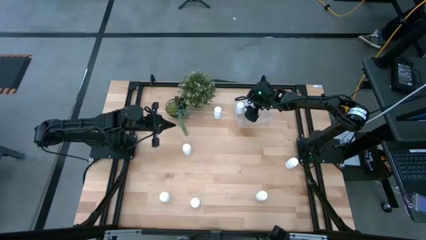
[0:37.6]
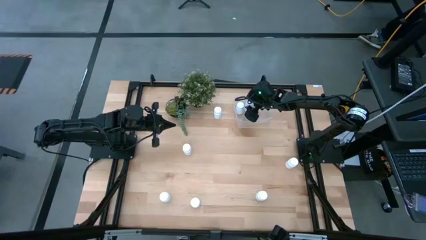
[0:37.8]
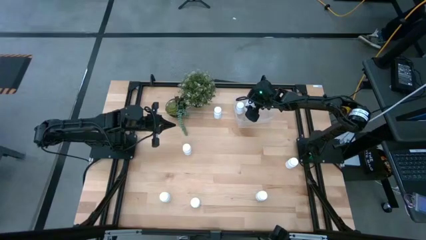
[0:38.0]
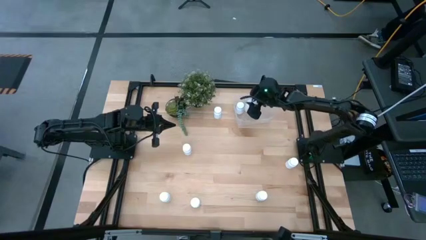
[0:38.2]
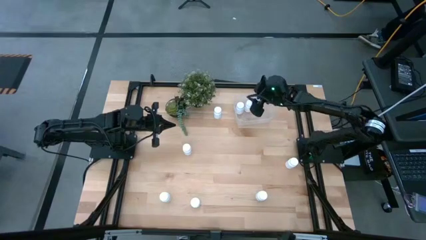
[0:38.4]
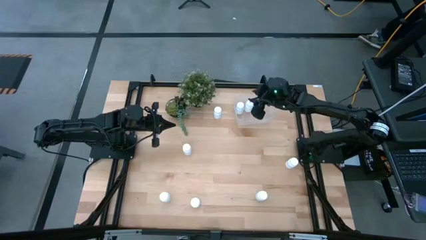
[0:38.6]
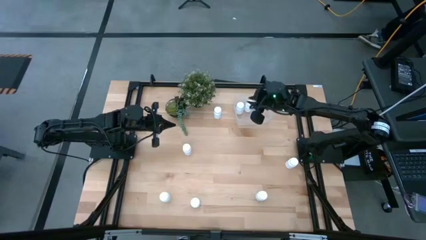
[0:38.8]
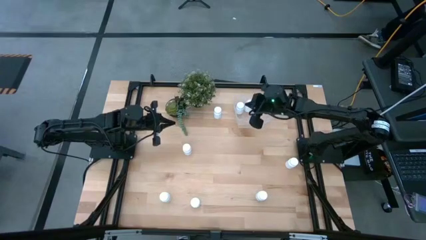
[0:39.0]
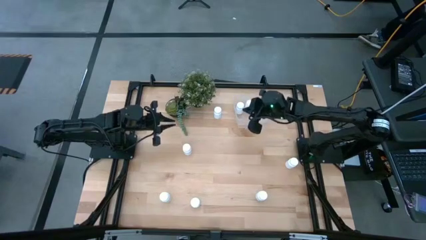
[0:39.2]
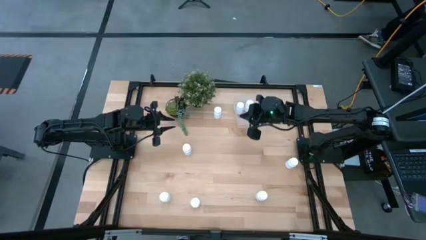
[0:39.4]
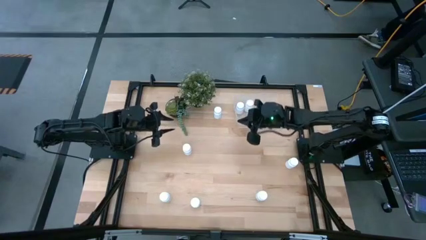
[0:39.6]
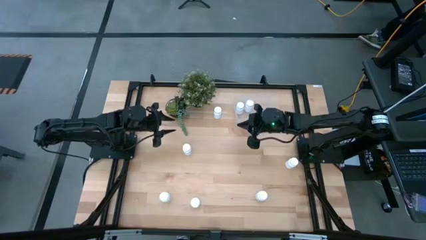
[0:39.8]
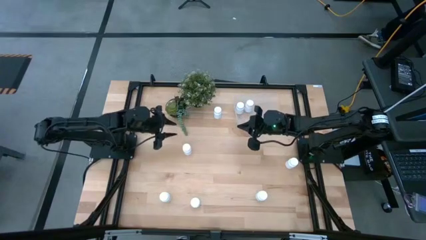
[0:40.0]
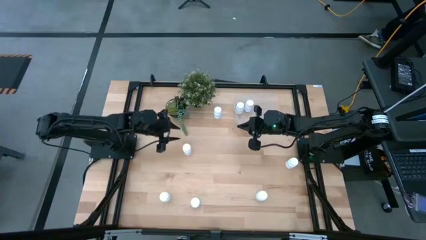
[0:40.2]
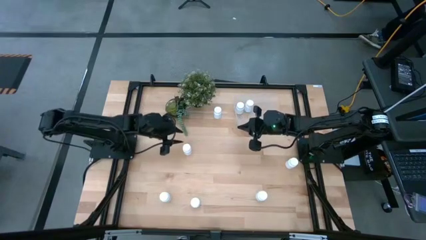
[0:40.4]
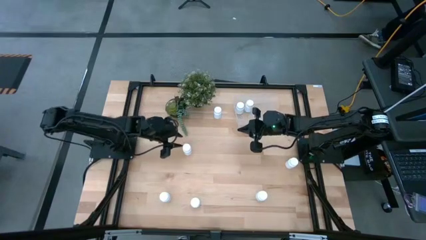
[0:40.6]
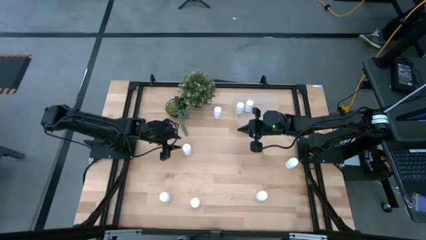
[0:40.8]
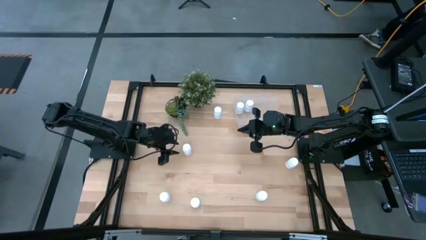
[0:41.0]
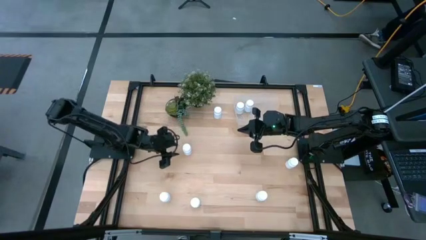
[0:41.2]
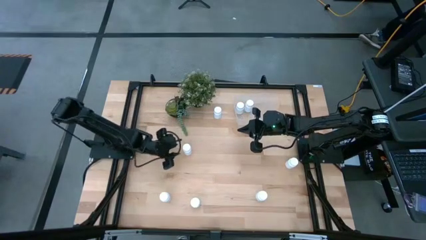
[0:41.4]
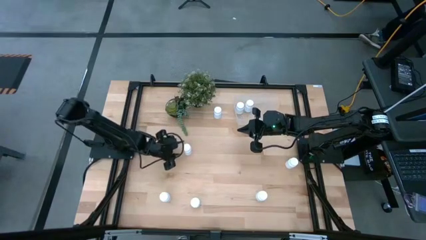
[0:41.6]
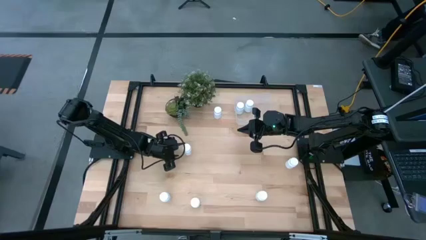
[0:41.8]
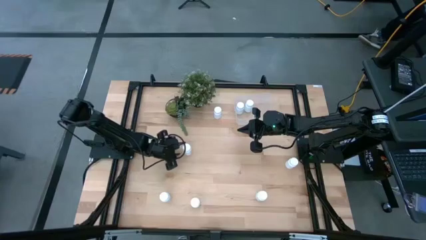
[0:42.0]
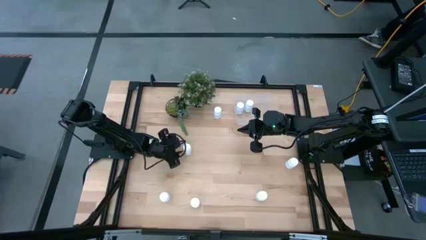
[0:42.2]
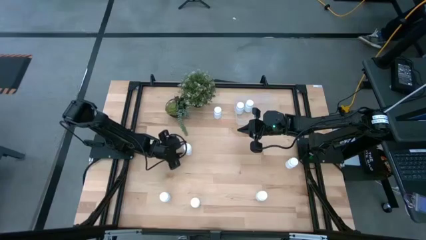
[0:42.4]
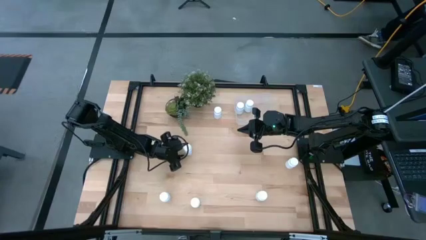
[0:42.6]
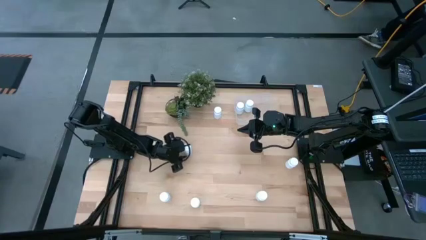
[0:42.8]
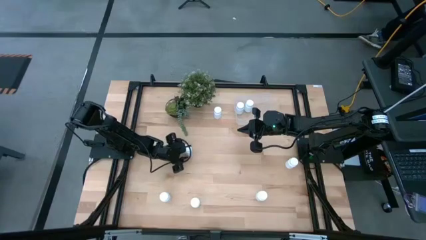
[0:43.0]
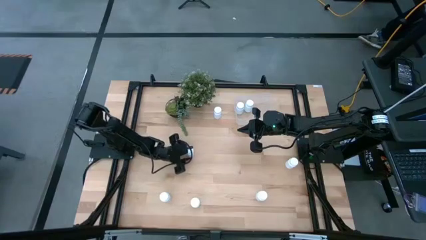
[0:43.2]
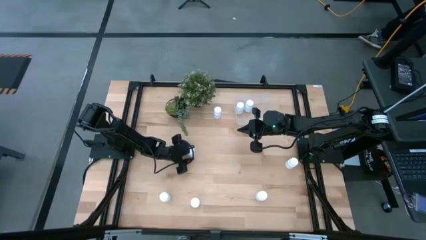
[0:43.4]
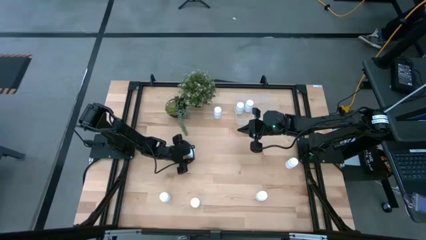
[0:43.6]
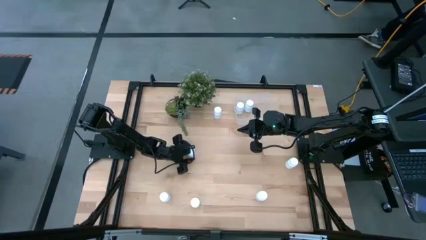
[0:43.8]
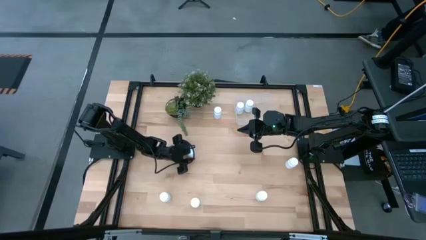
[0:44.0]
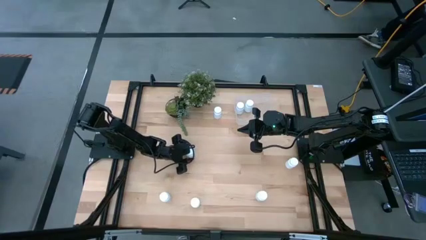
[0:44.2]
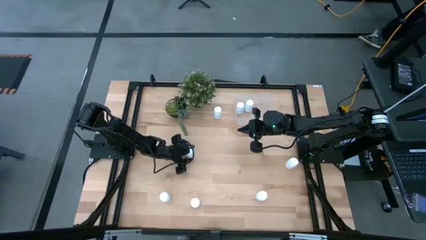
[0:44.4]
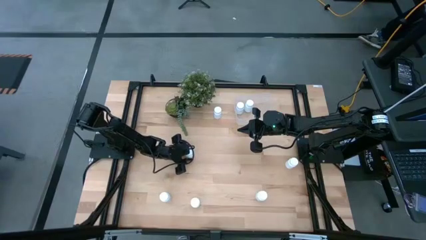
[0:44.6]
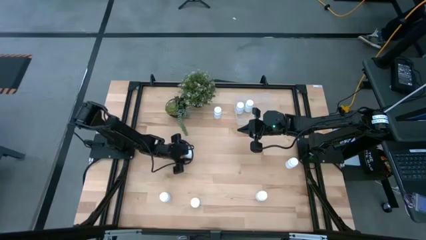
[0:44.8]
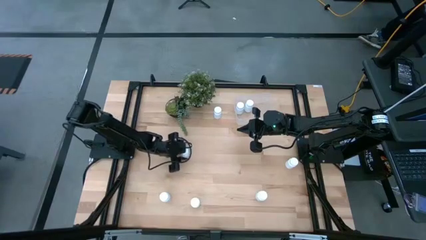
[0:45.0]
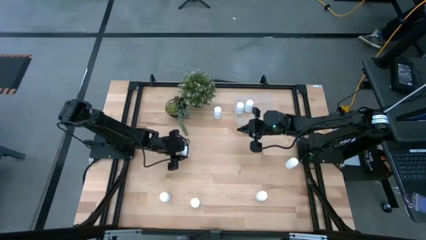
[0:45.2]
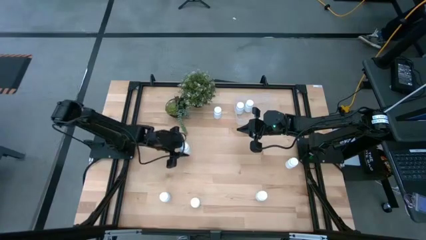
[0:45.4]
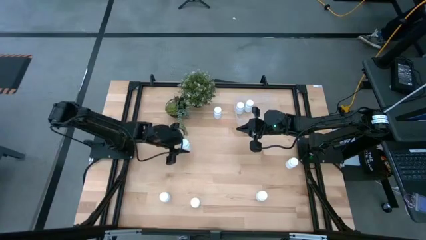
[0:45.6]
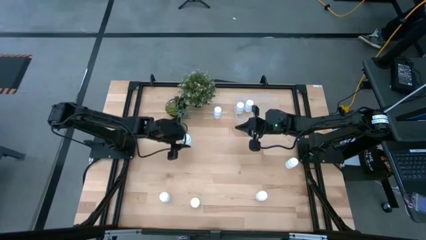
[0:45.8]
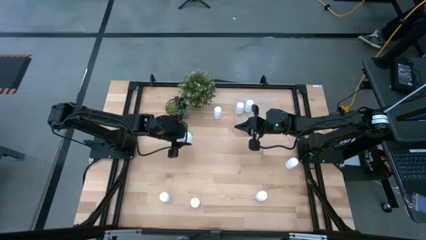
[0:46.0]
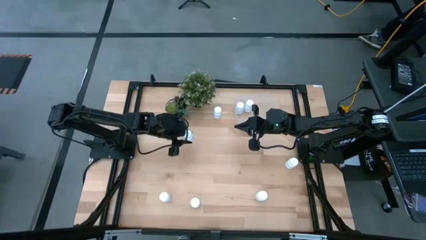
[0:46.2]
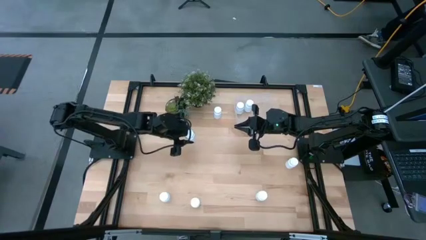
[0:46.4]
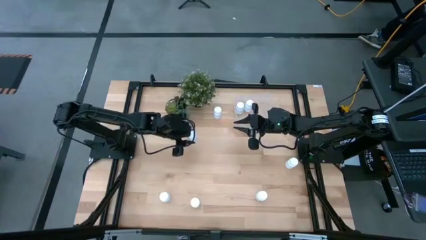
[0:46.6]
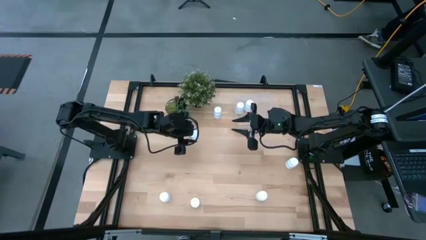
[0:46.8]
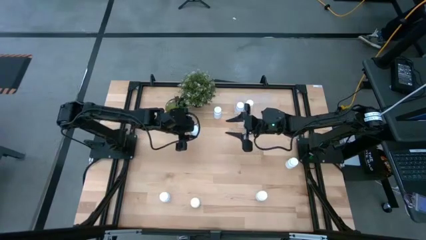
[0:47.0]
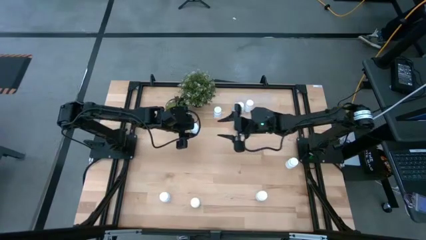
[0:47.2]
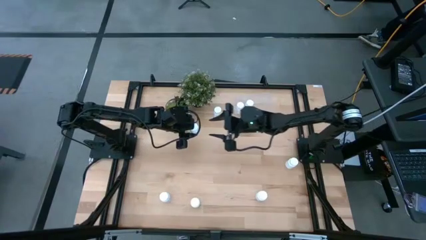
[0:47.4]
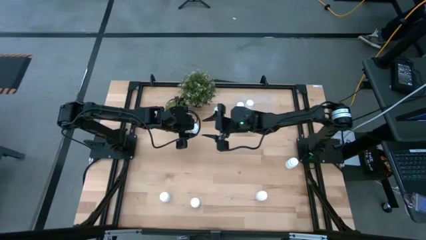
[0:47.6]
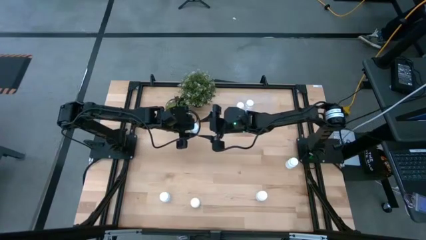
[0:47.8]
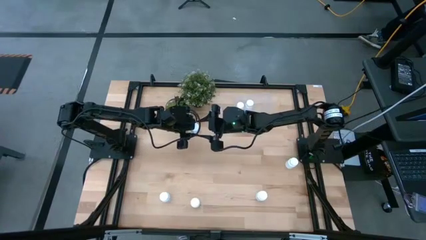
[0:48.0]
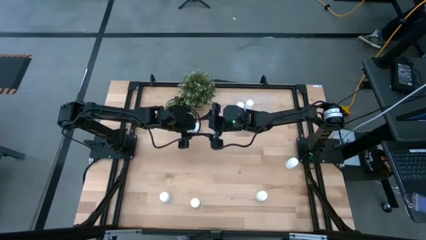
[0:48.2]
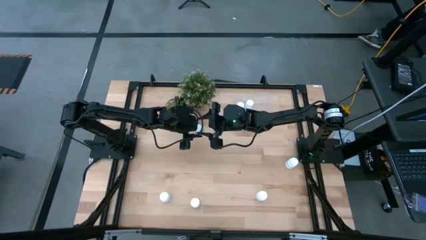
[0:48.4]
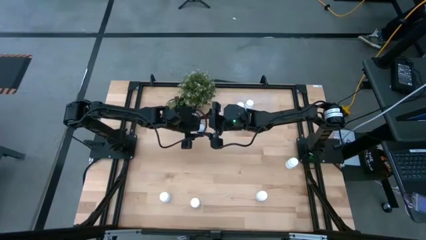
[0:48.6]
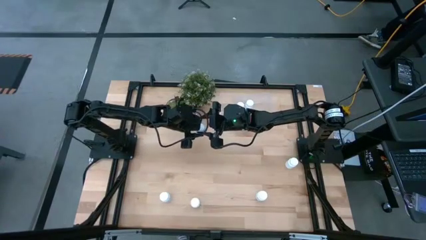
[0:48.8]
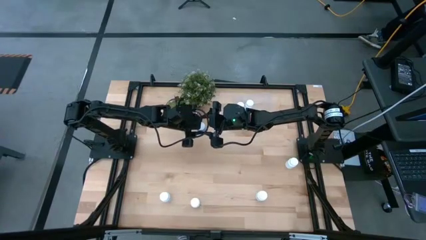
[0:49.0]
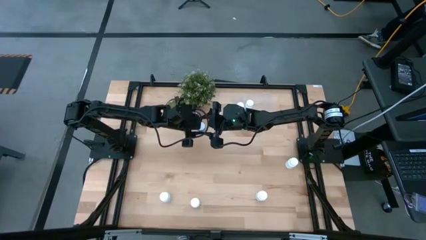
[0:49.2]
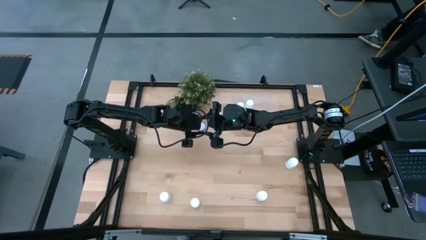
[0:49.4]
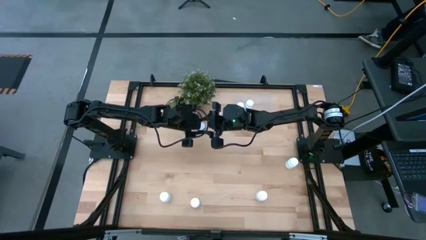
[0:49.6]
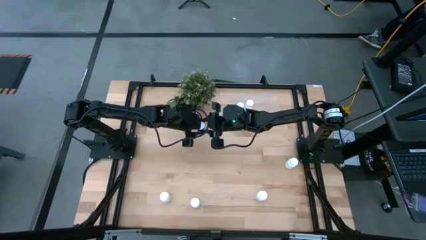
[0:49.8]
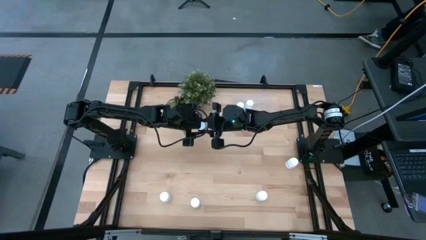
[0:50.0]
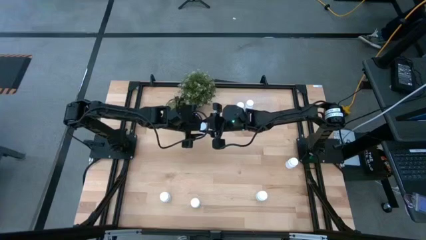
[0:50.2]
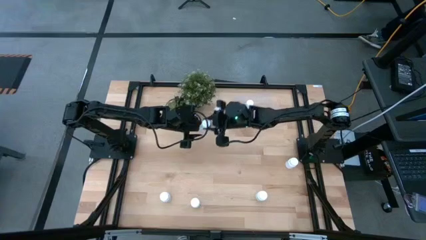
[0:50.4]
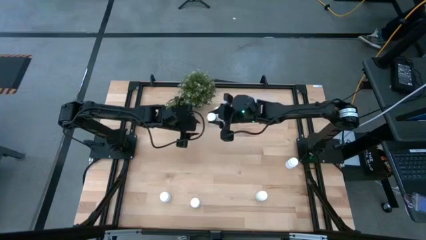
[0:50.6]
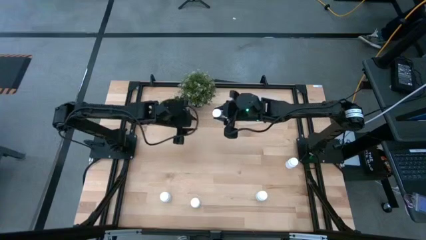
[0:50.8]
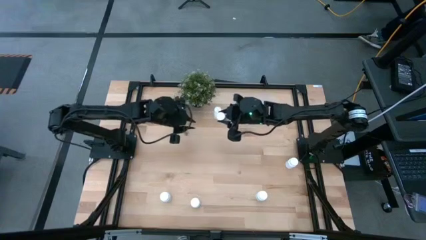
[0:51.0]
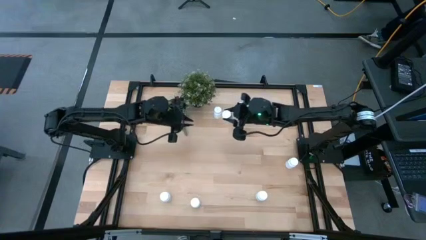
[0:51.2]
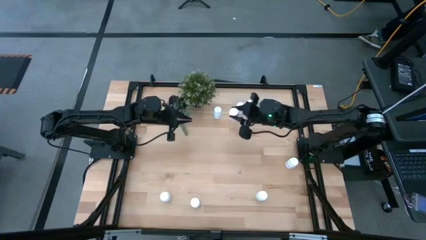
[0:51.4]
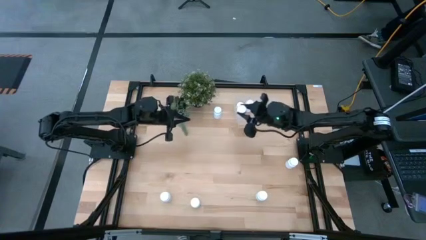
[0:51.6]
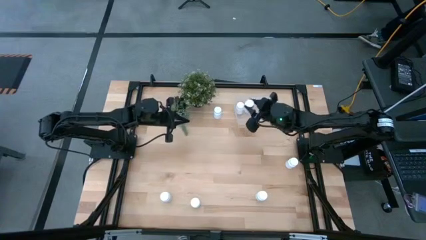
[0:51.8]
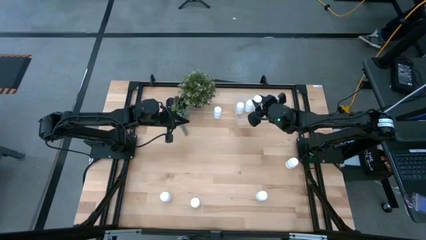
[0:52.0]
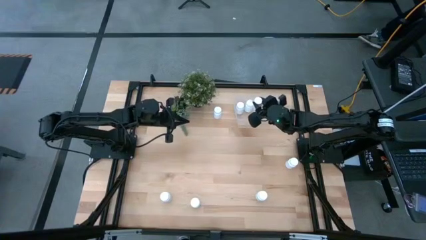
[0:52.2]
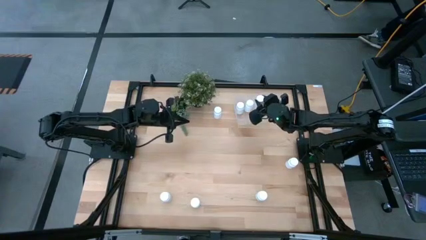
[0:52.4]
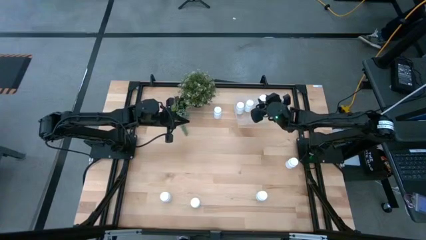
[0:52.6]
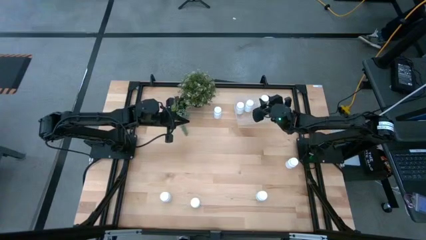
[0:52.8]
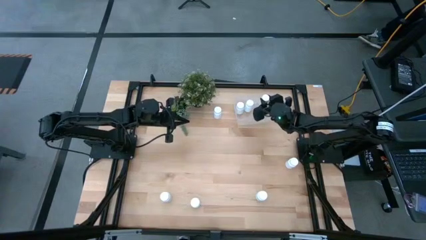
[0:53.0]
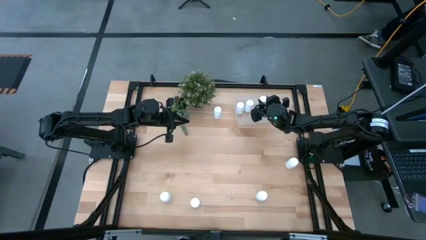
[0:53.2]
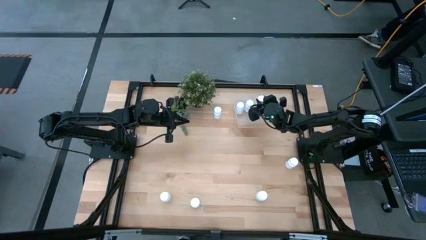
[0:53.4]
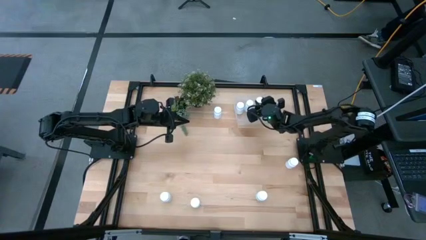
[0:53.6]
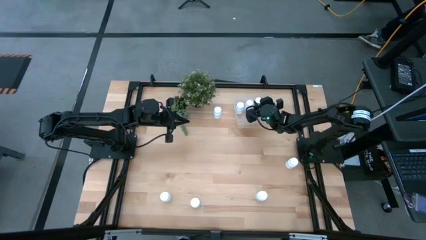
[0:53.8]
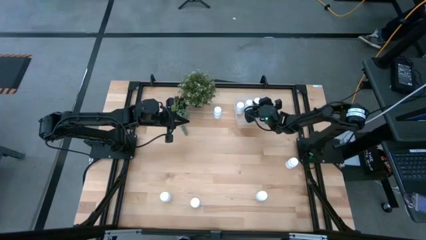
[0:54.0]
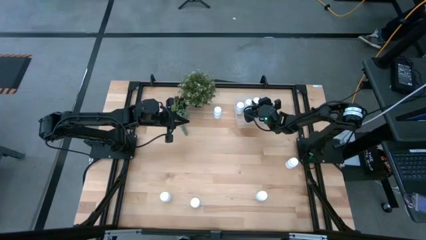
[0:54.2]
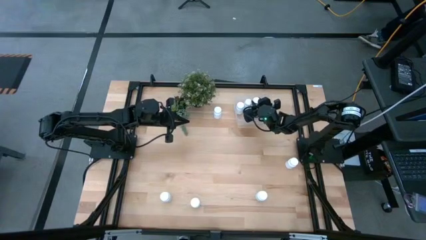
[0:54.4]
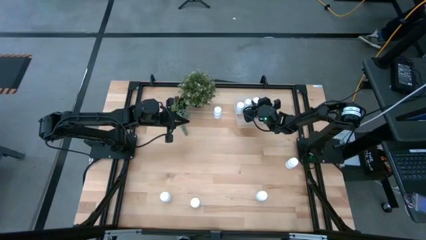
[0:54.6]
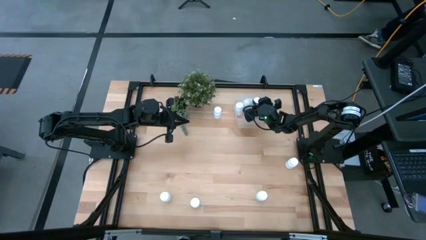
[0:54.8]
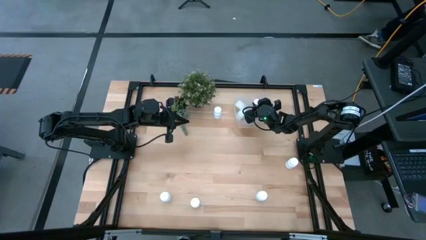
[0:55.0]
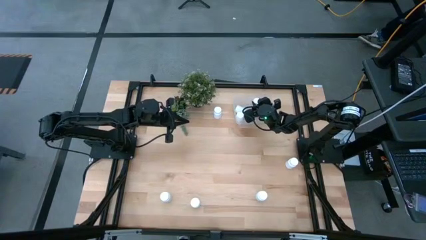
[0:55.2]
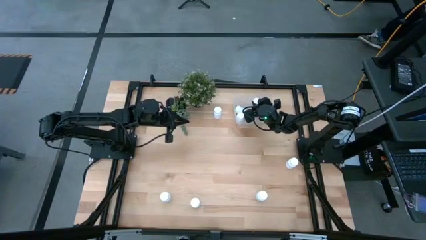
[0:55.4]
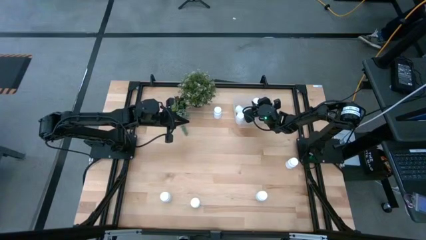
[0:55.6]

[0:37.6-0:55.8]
Task: Pick and place pill bottles into a basket
Put the white pill bottle into the transparent bin
